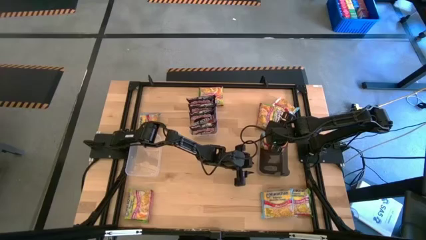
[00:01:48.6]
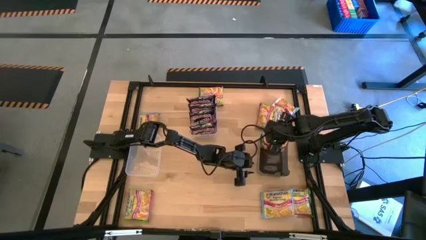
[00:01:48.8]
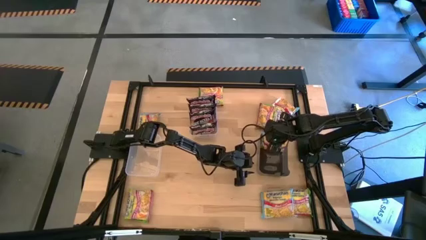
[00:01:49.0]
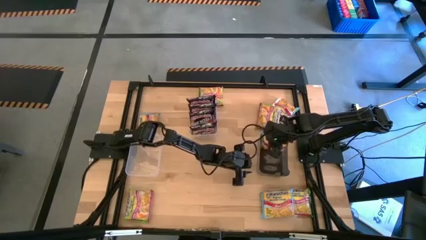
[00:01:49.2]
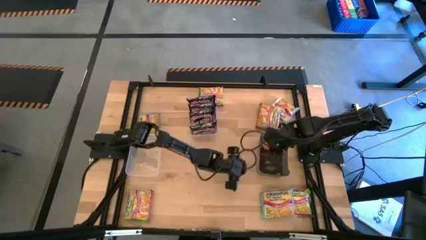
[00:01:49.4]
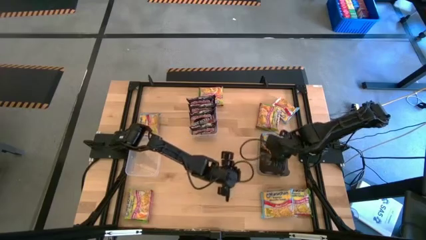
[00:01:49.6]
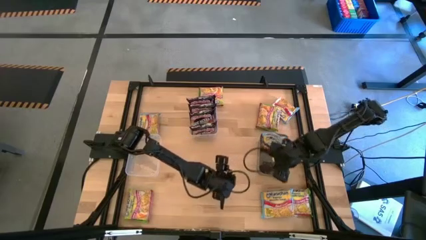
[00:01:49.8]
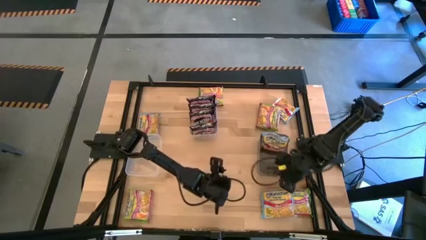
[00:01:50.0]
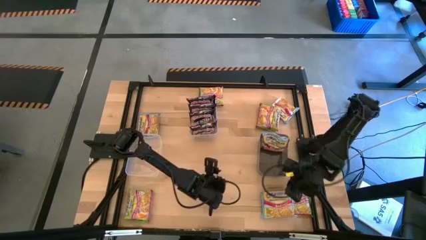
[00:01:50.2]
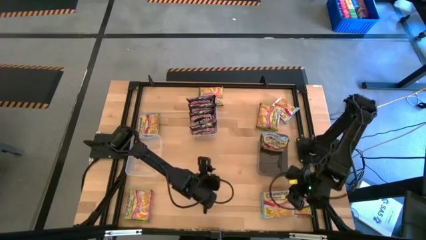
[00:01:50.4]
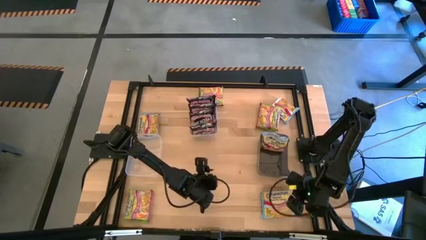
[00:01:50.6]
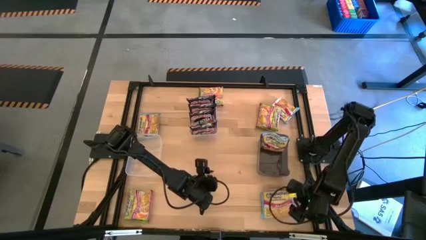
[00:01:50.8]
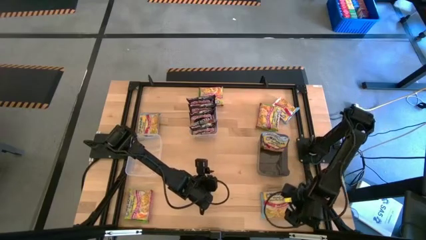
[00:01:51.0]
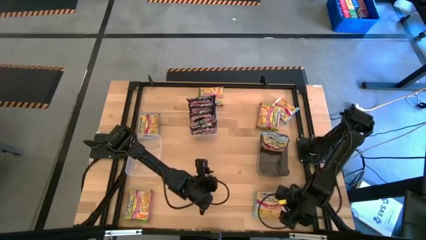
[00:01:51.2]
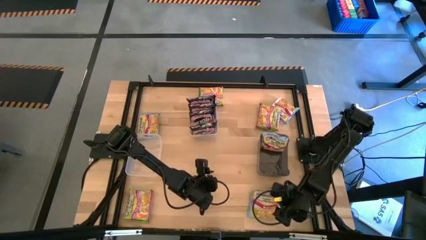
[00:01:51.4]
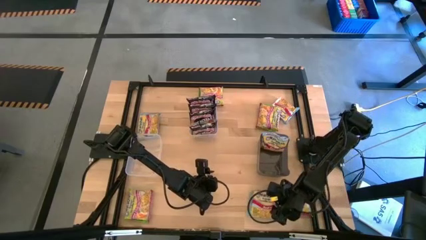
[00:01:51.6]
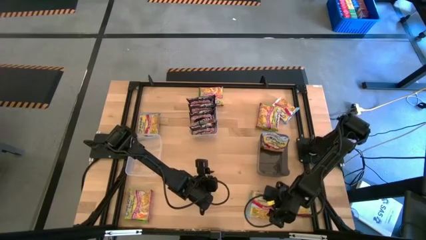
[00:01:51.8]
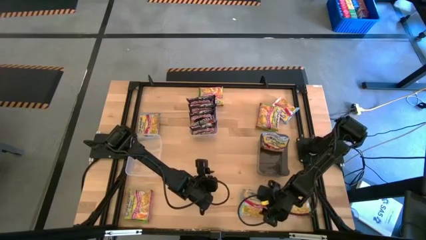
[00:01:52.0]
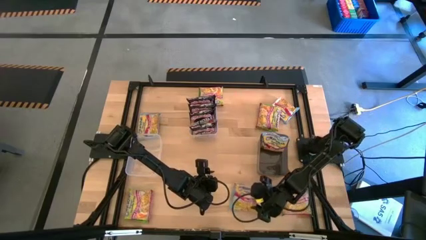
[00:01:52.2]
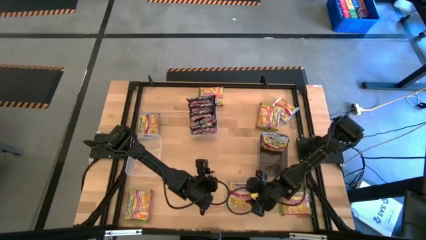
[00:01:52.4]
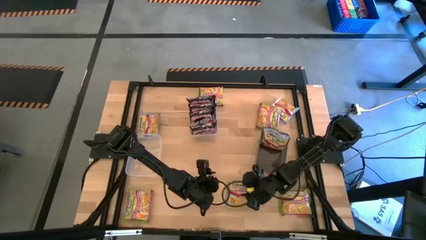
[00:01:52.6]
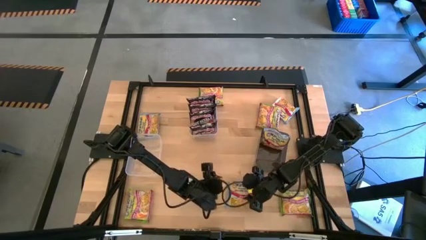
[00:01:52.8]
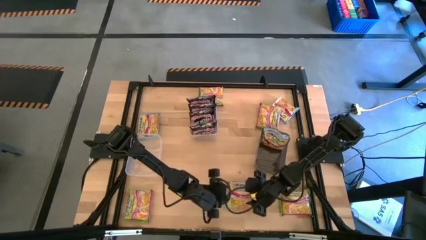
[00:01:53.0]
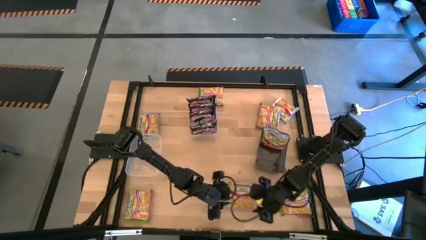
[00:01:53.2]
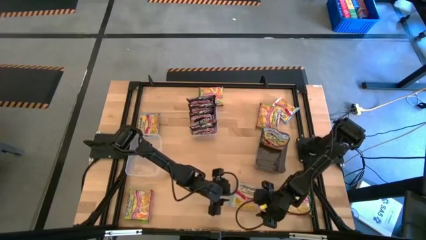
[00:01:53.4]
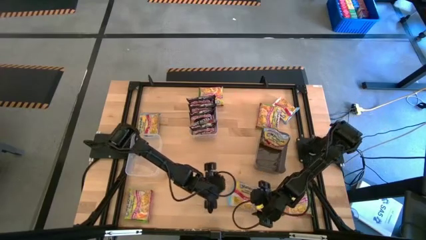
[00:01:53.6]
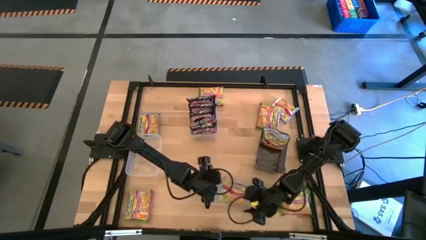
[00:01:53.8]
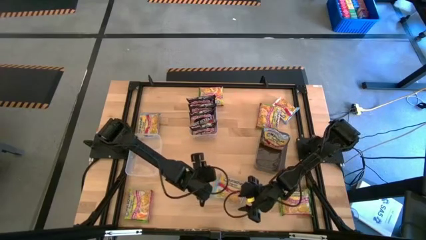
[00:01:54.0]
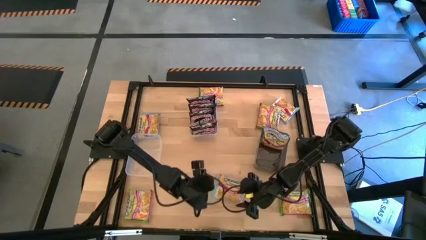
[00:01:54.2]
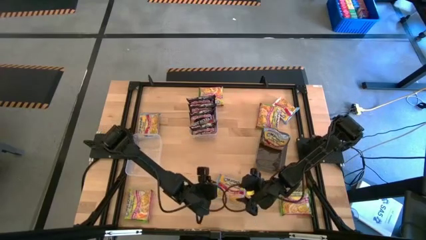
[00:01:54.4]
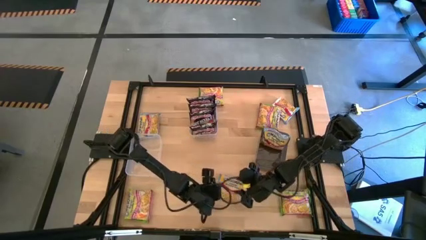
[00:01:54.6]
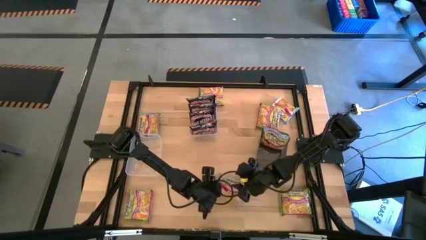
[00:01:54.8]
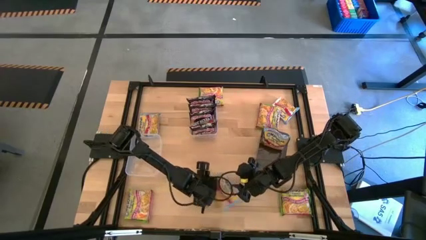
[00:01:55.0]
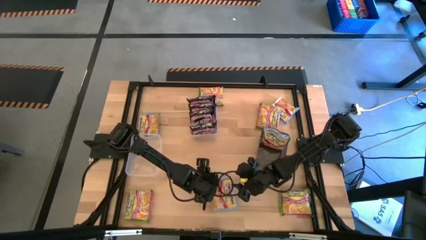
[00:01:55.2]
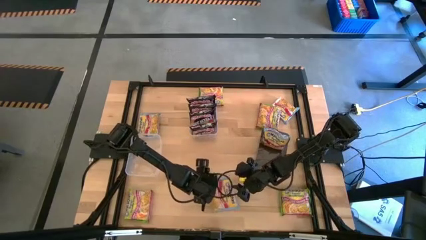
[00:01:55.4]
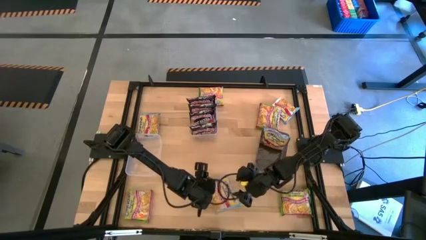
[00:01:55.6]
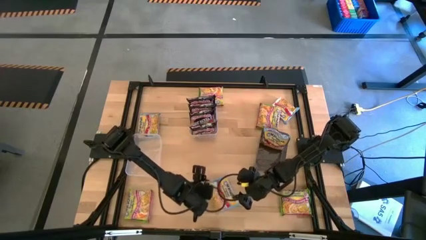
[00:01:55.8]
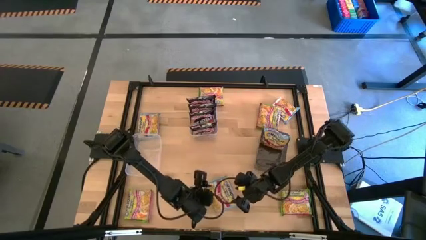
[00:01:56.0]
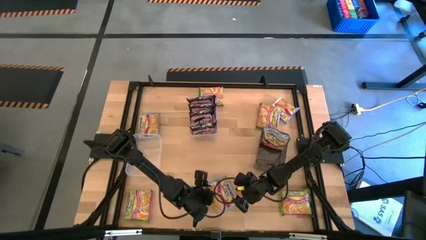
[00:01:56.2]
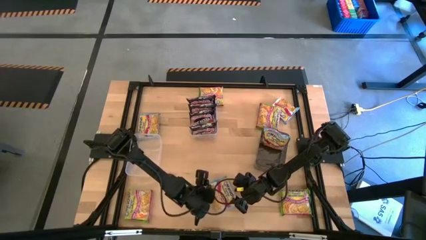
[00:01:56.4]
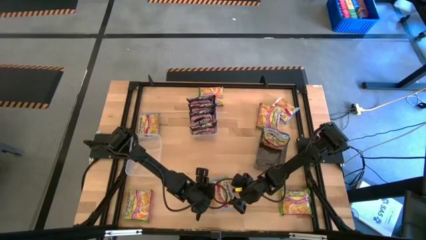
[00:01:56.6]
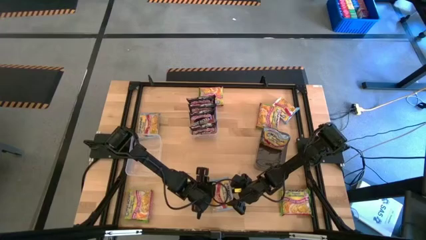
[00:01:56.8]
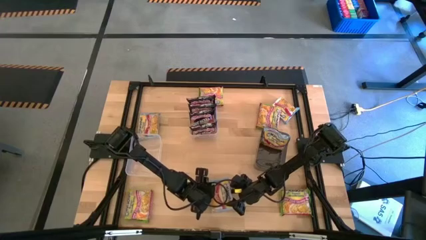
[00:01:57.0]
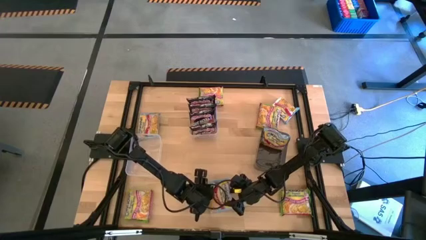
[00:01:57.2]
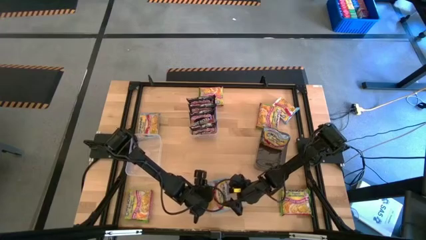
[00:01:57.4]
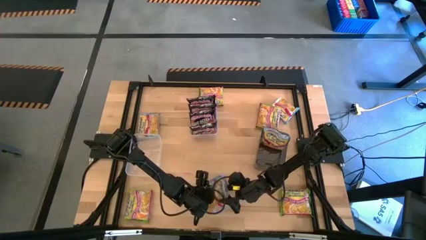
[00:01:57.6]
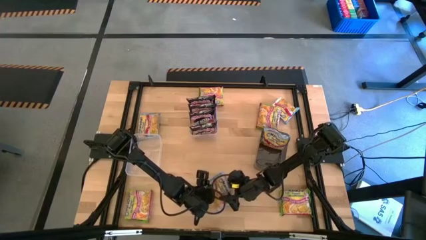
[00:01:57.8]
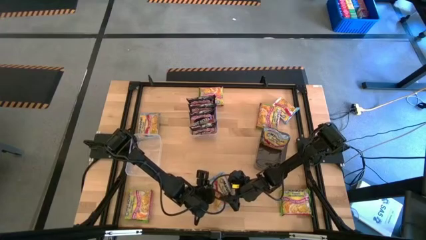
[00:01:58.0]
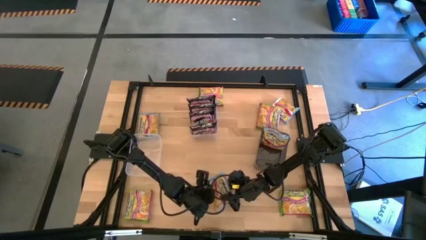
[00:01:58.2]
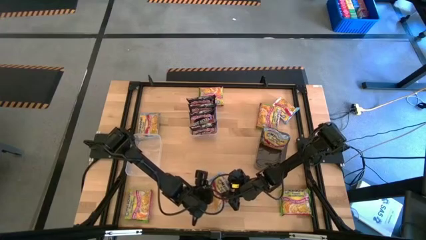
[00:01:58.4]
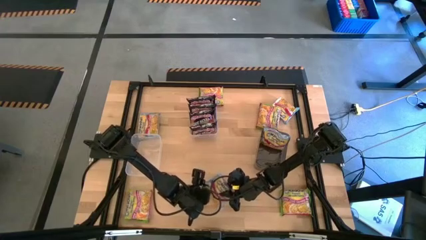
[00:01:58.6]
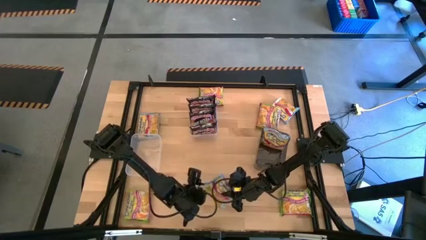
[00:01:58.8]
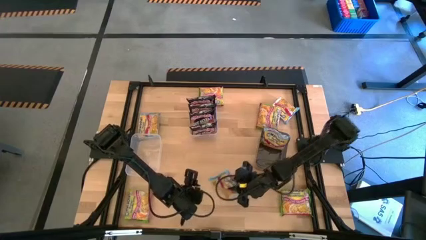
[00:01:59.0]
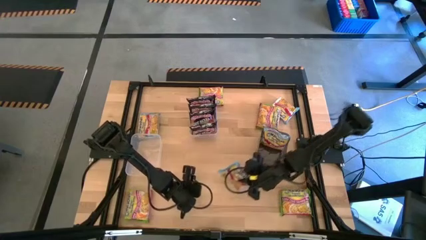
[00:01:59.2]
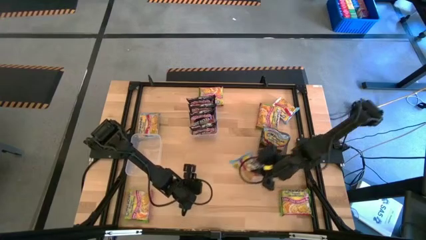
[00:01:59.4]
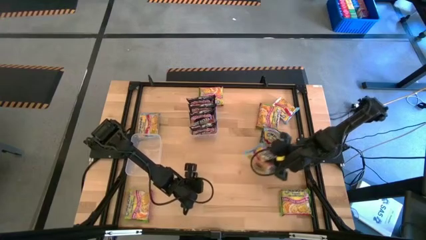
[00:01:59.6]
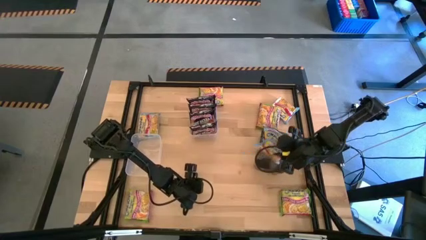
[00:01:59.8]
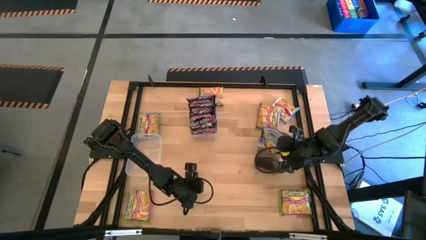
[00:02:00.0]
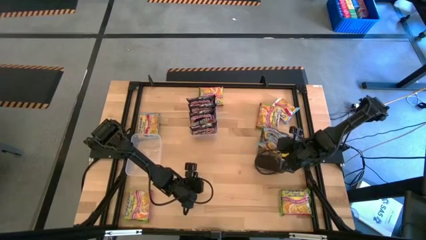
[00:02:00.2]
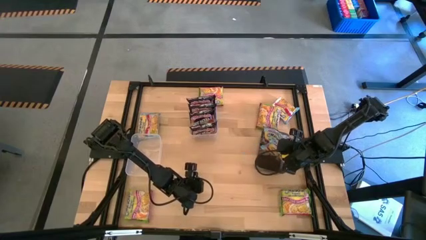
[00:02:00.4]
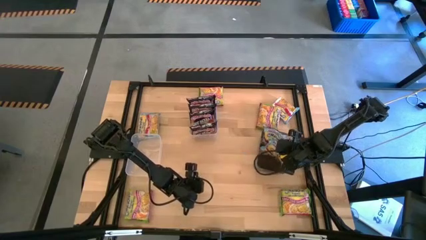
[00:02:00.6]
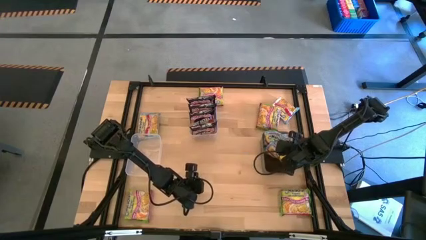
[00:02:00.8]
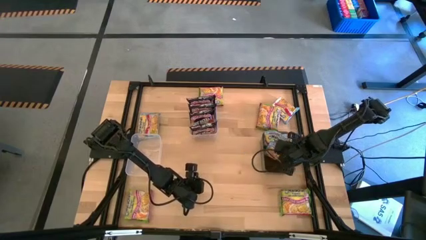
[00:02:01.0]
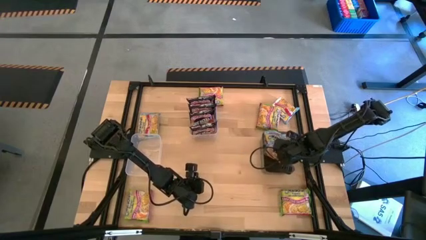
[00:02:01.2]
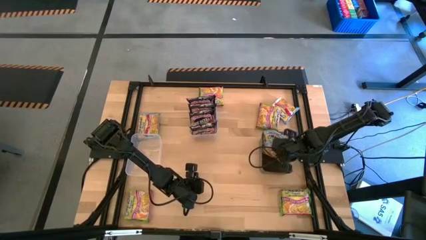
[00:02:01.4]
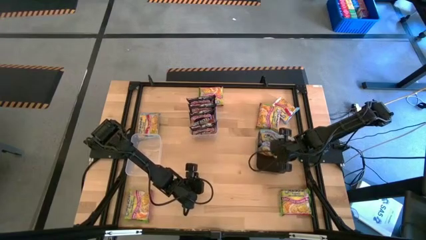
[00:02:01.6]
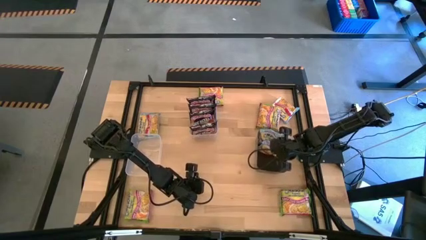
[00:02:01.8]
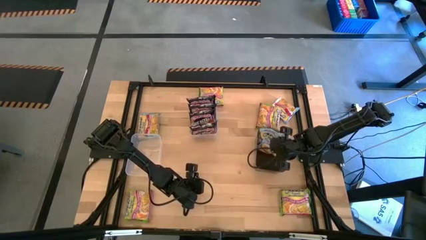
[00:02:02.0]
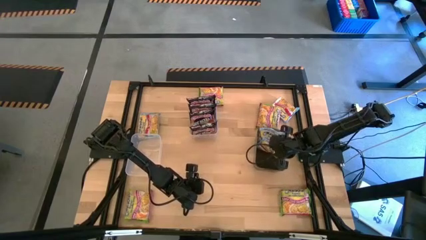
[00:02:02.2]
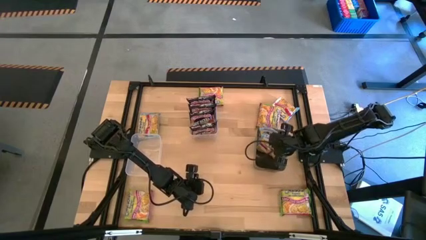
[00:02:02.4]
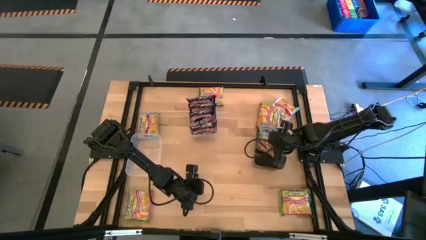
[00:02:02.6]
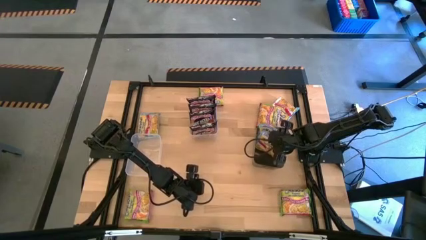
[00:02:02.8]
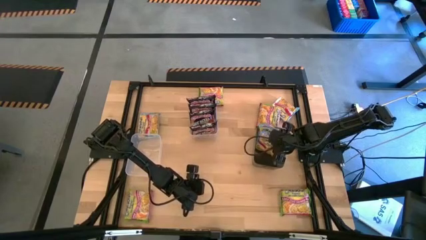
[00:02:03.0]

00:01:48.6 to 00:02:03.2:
Task: Sort Maruchan noodles
Put the blue noodle pack into the black bin

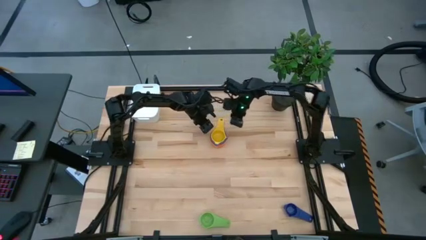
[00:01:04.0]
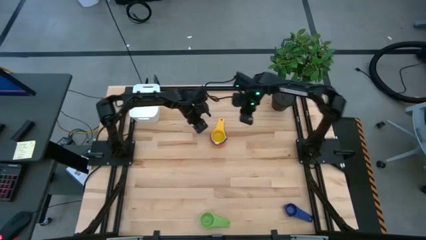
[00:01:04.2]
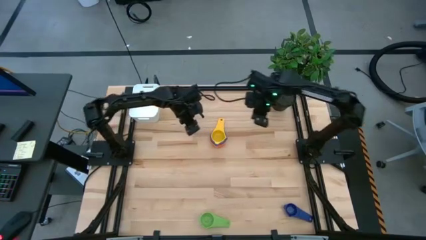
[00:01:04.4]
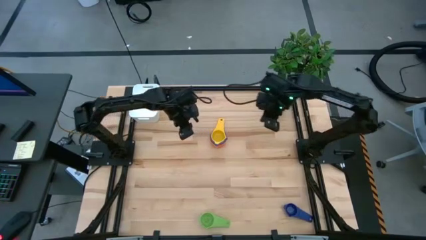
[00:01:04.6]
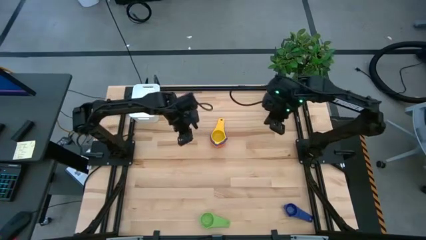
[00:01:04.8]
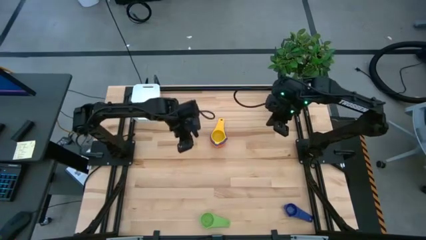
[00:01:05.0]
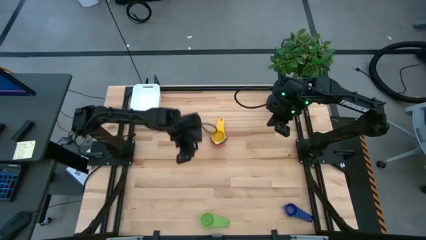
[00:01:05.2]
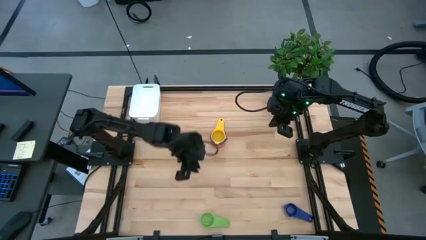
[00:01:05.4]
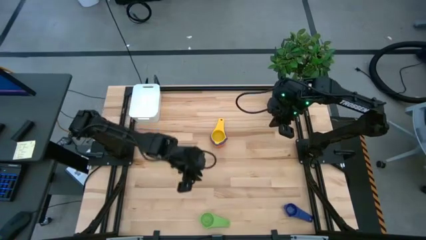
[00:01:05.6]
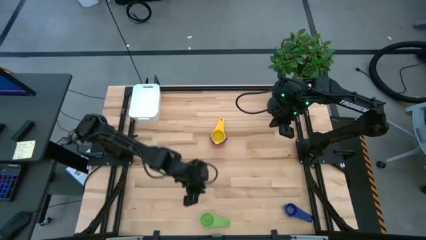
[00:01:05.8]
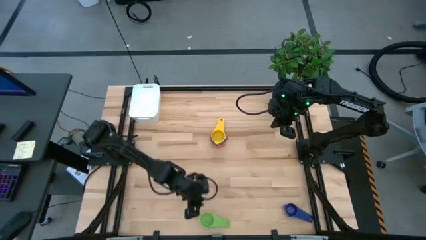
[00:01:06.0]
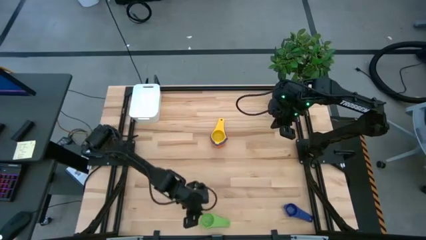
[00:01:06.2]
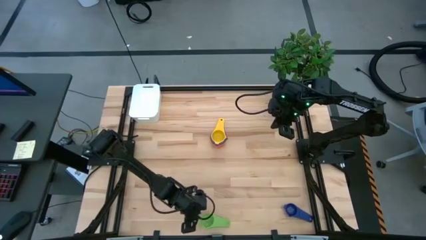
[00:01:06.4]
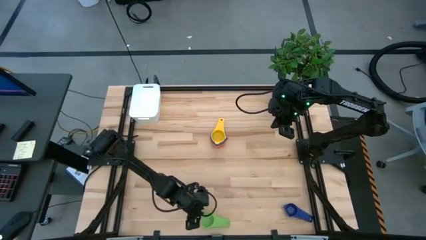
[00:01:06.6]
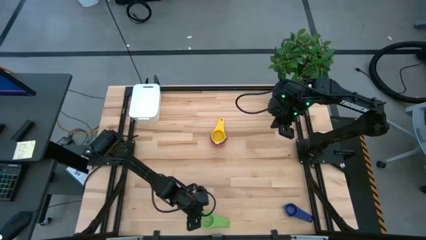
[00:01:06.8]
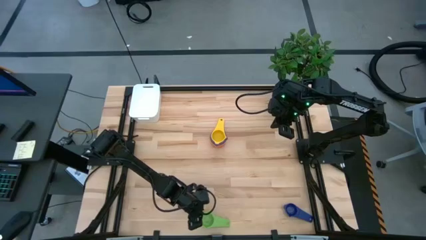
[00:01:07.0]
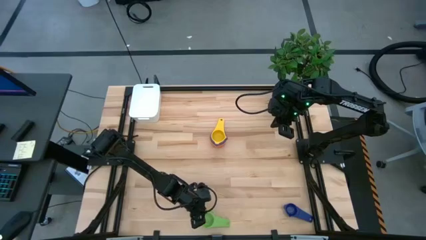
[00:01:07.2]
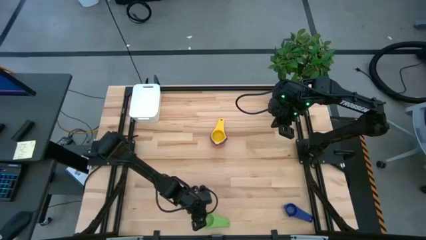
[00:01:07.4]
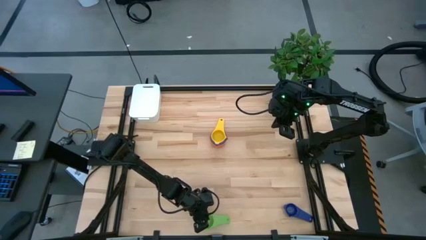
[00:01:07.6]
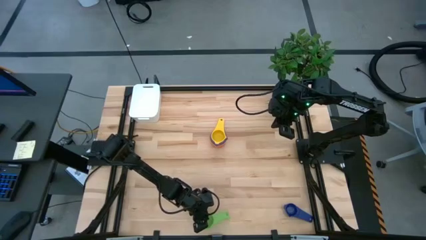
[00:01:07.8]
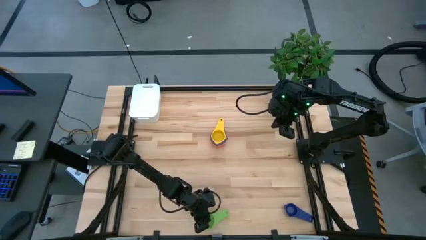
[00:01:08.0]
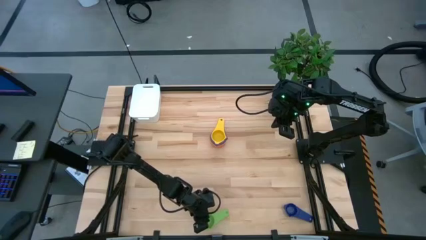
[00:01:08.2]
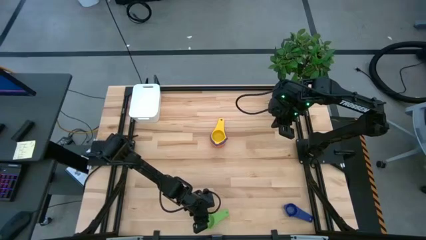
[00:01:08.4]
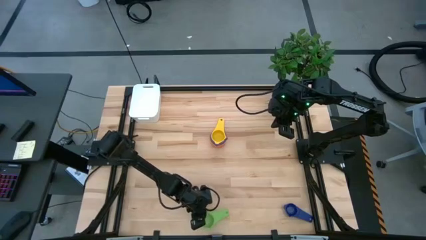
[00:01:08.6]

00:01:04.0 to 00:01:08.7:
Task: Nest measuring cups in basket
Stack the green measuring cup on top of the yellow measuring cup
